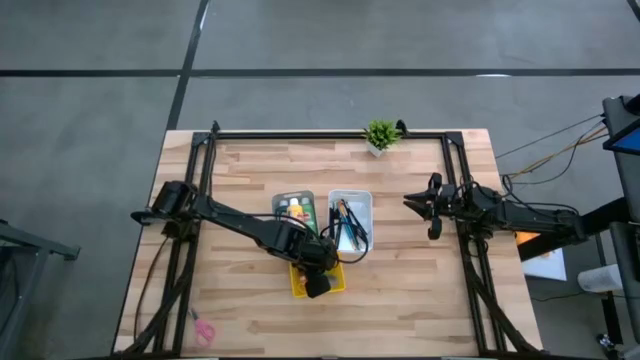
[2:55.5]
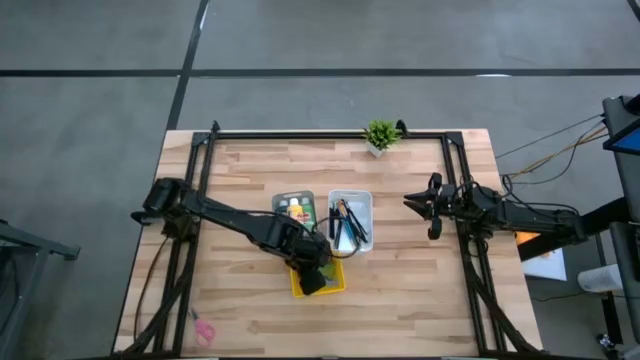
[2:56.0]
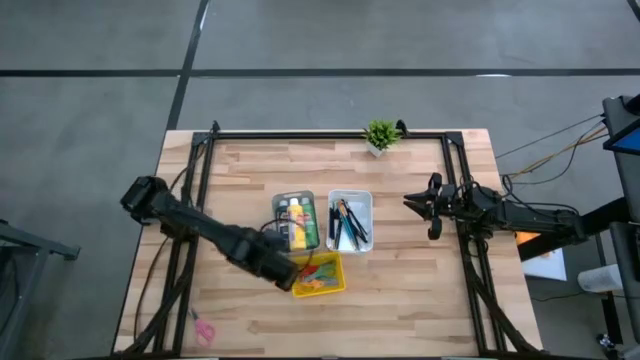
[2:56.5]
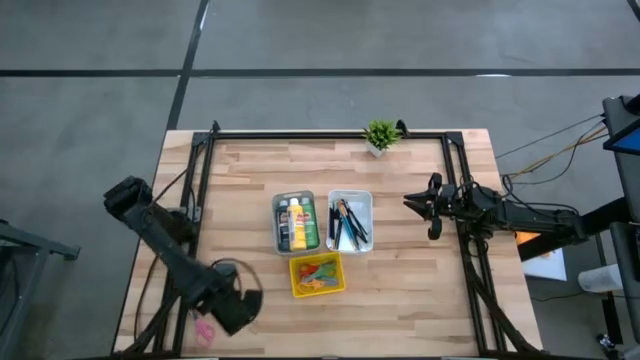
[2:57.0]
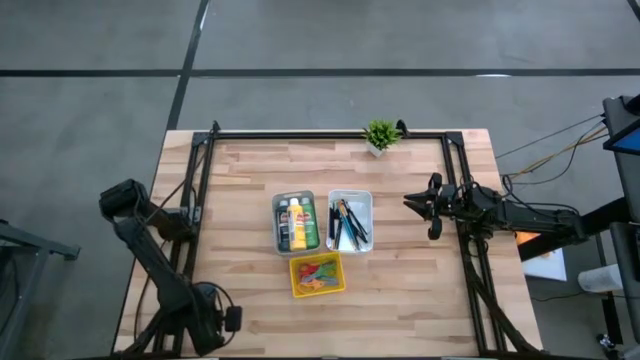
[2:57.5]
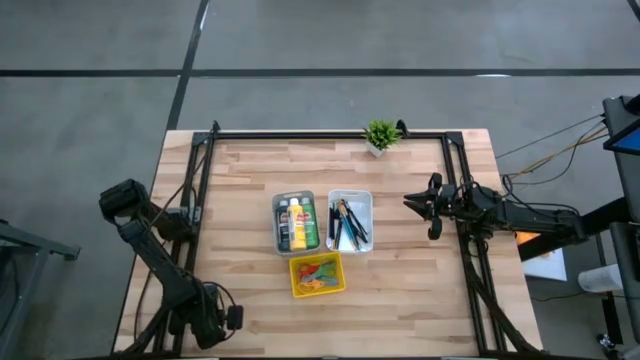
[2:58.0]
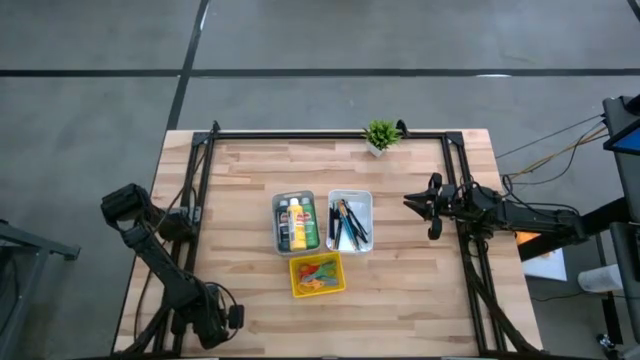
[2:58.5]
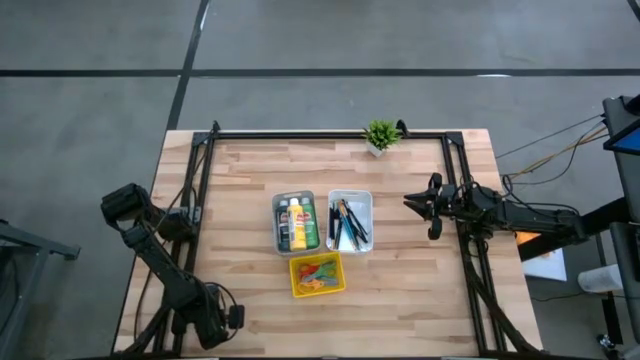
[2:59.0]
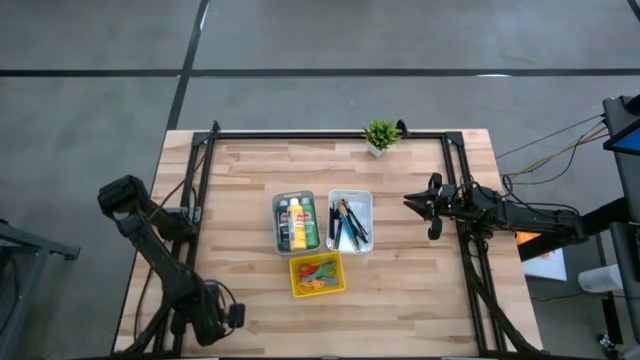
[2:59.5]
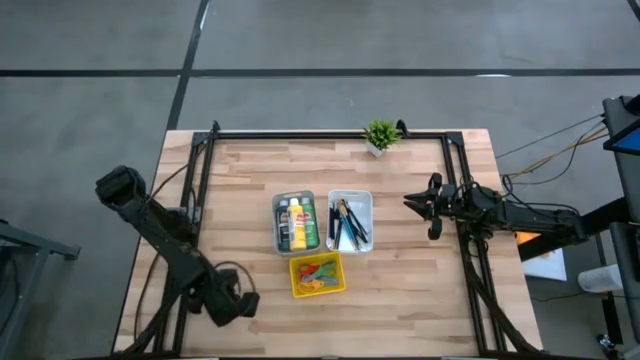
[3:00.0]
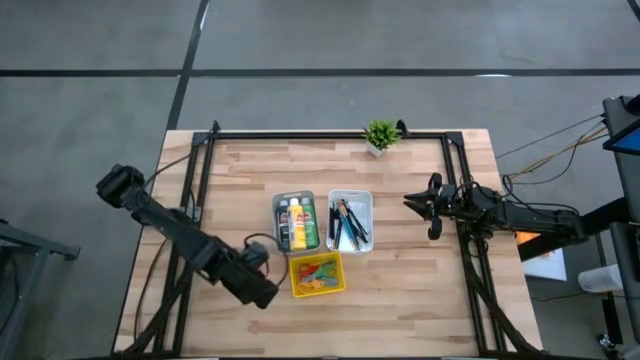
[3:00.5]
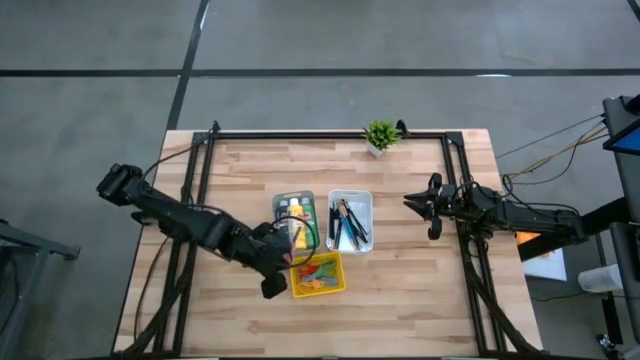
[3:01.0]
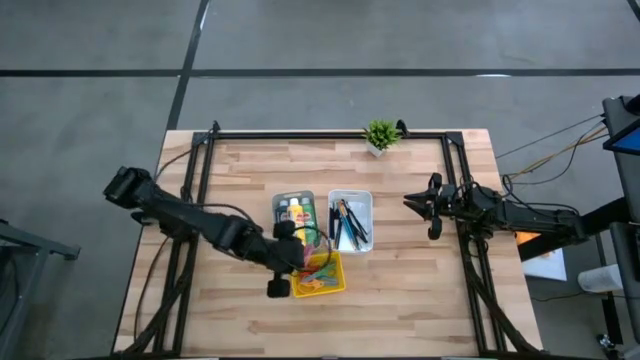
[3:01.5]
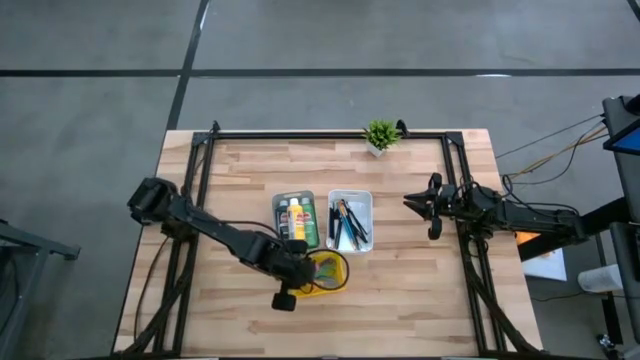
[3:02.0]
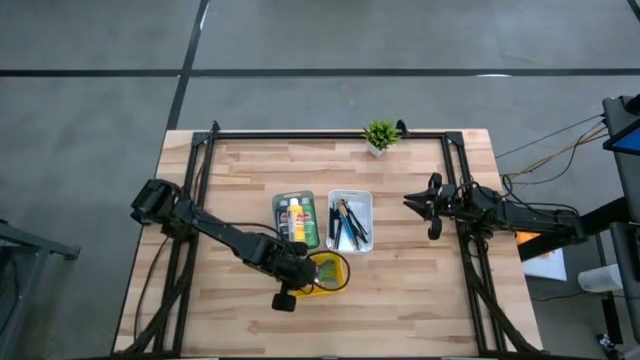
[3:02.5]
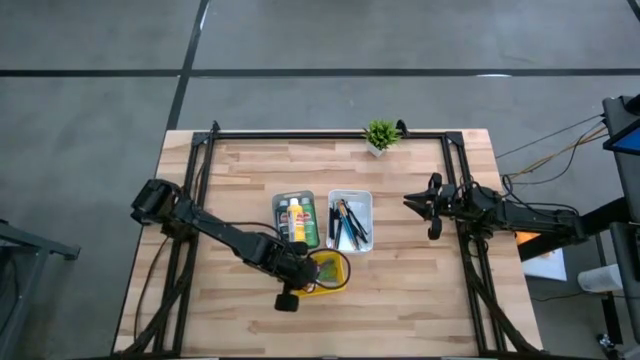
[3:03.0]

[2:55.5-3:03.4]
Task: Pick & Place Paint Supplies
Put the pink scissors into the yellow bin

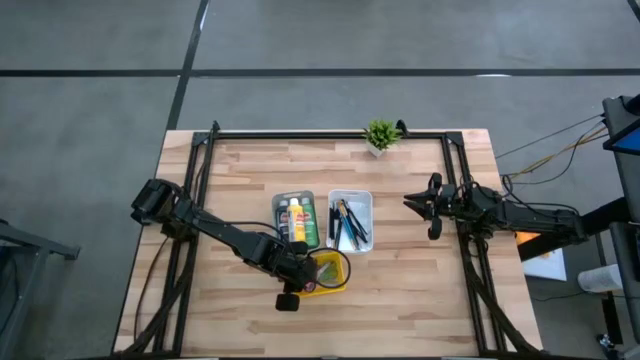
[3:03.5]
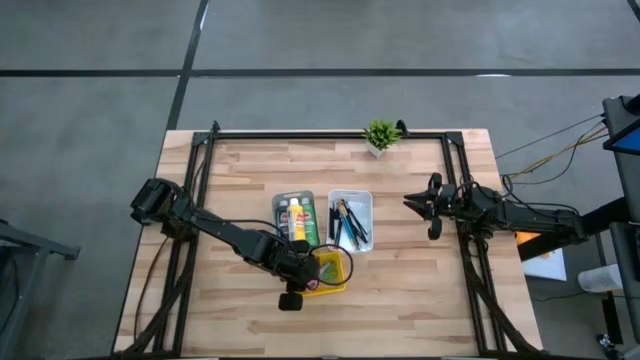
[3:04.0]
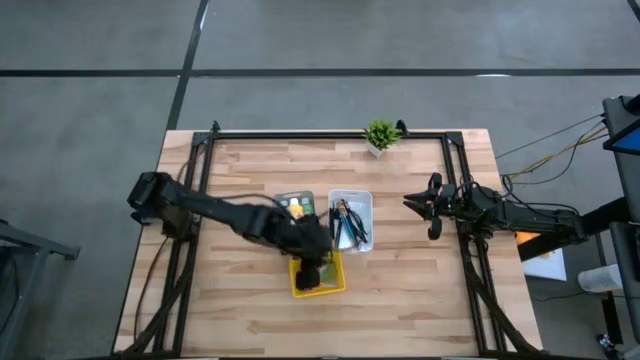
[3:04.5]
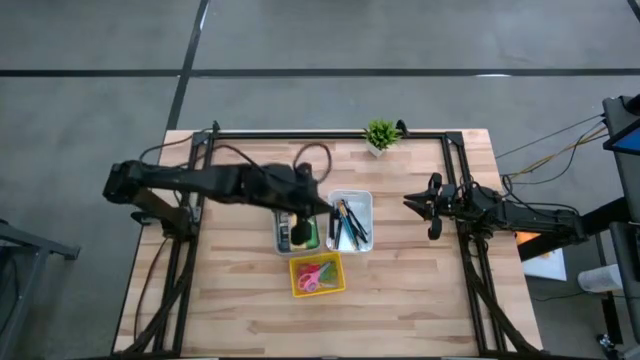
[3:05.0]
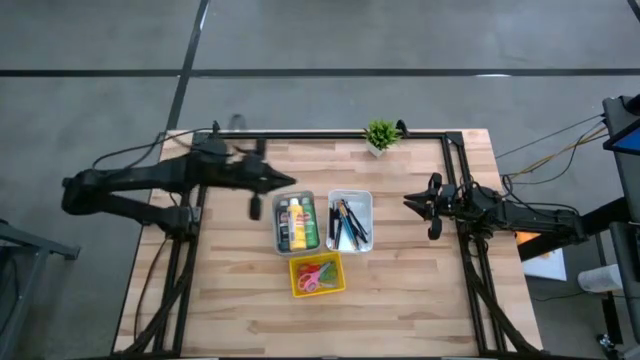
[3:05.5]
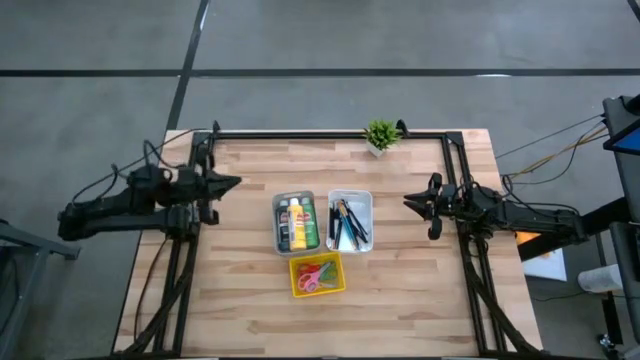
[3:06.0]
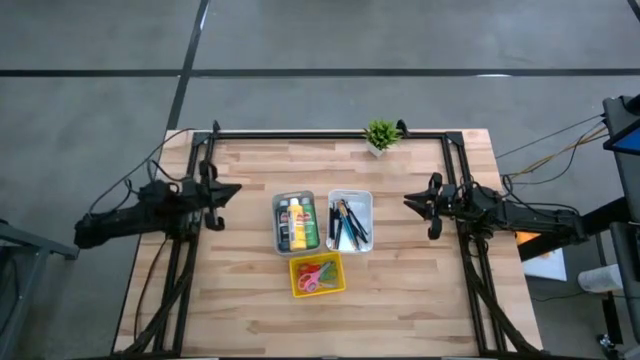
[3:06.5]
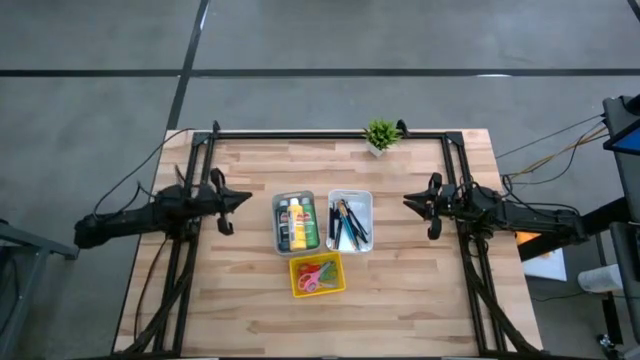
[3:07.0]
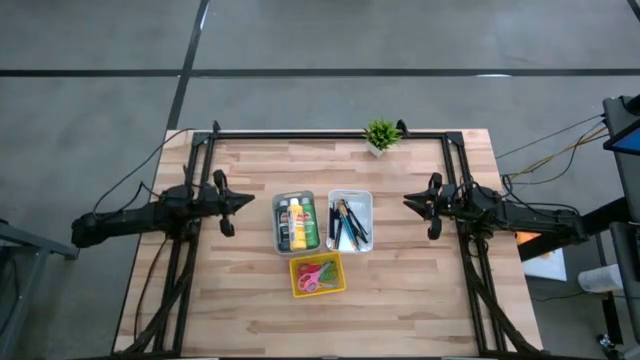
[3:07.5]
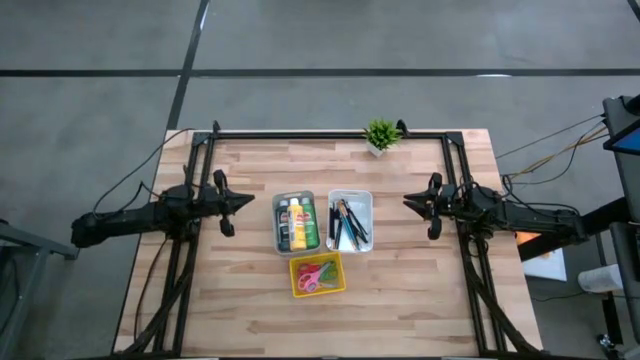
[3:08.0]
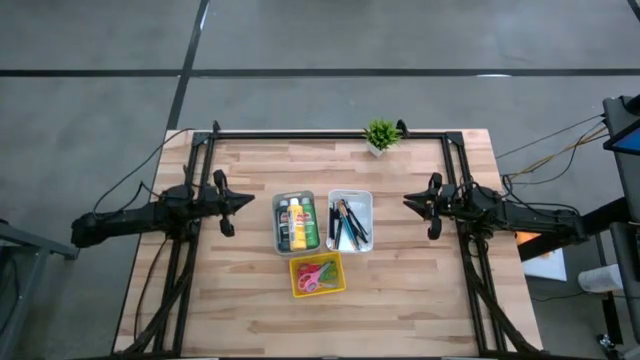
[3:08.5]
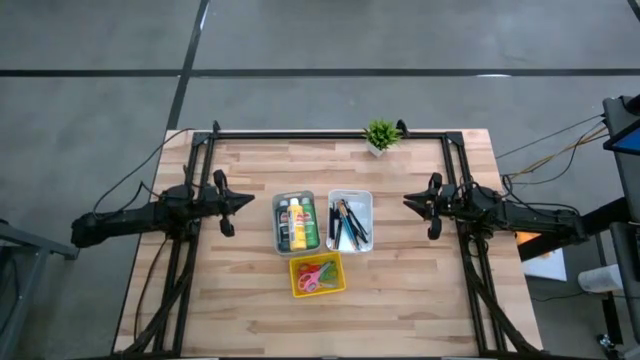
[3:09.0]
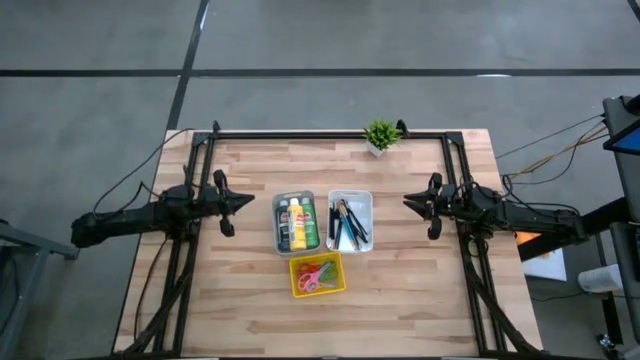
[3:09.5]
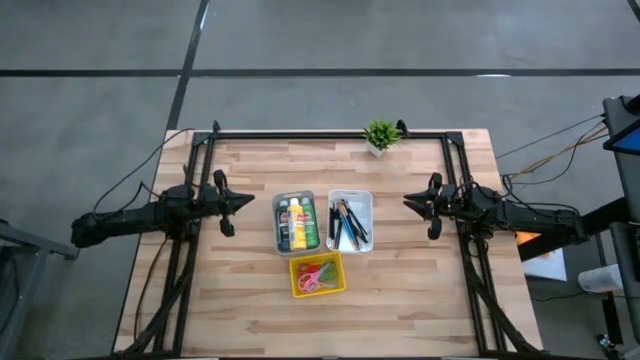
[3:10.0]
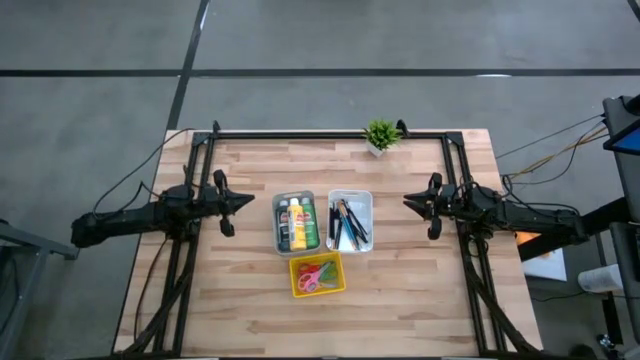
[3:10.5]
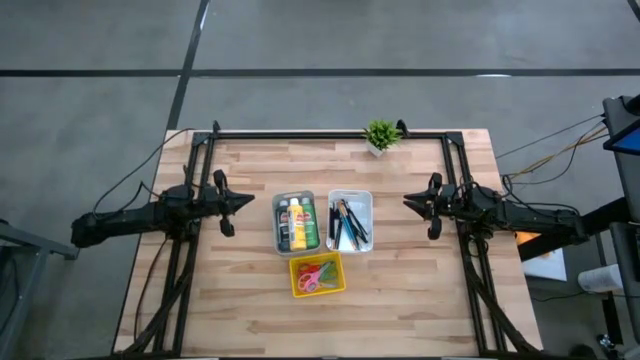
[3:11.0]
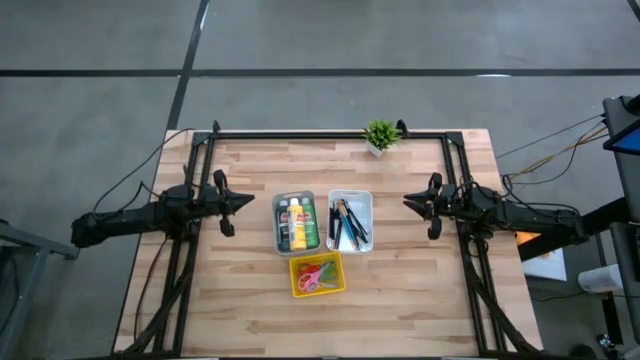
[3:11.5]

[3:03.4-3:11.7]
Return to Home Position

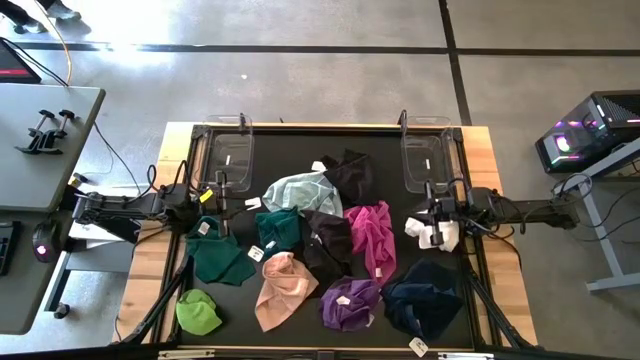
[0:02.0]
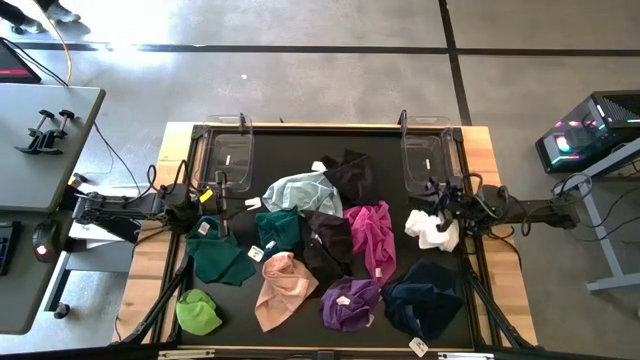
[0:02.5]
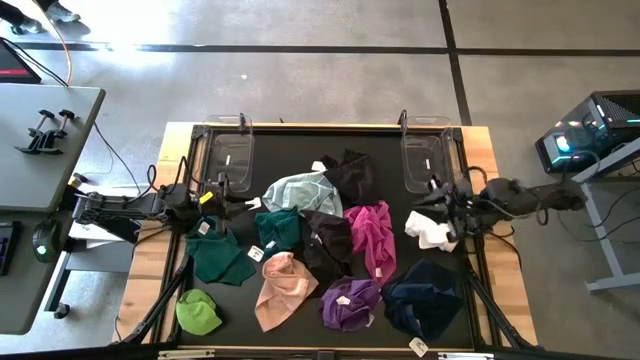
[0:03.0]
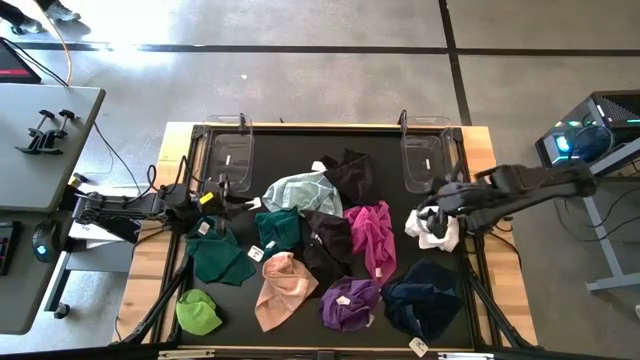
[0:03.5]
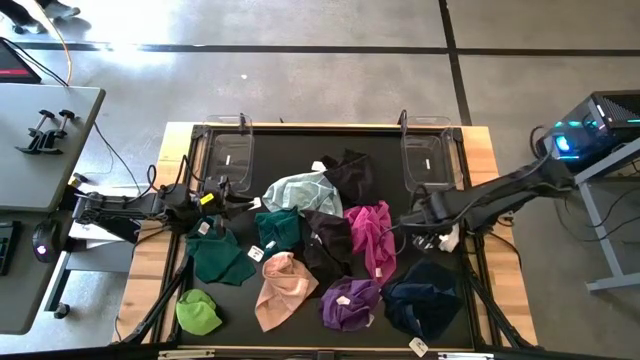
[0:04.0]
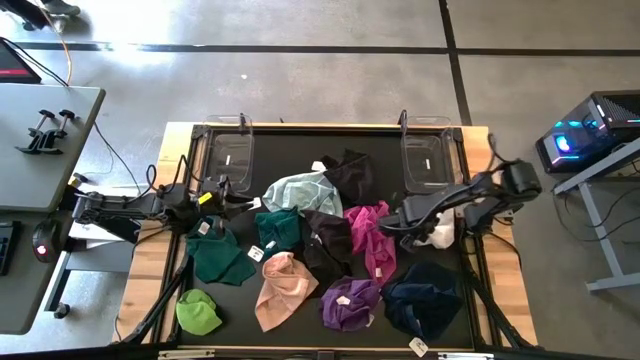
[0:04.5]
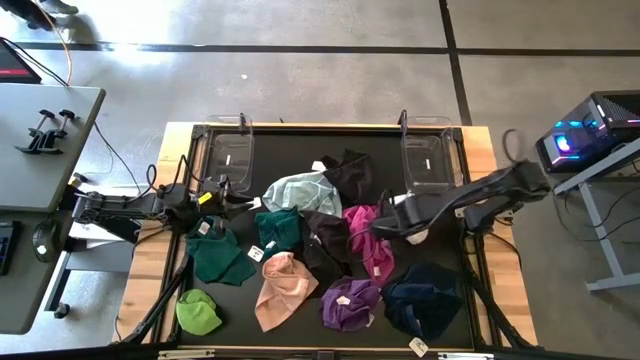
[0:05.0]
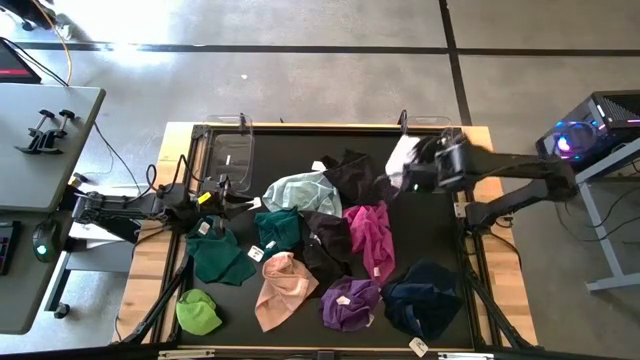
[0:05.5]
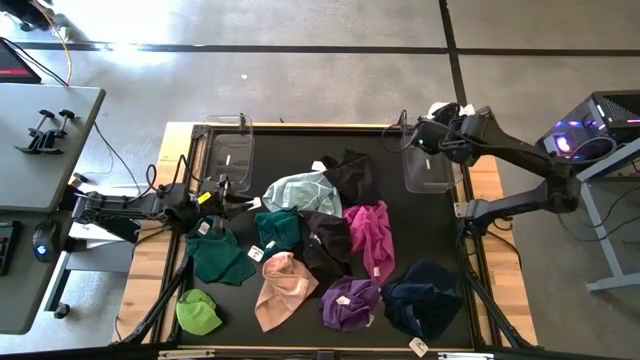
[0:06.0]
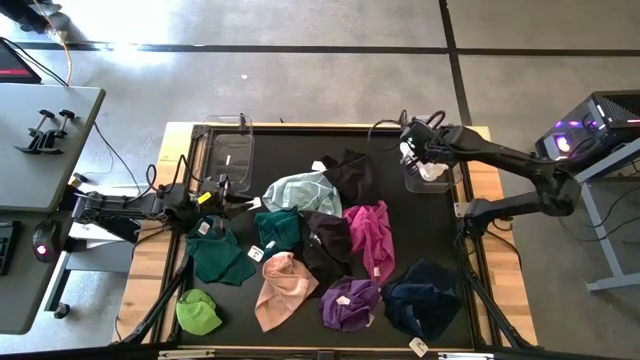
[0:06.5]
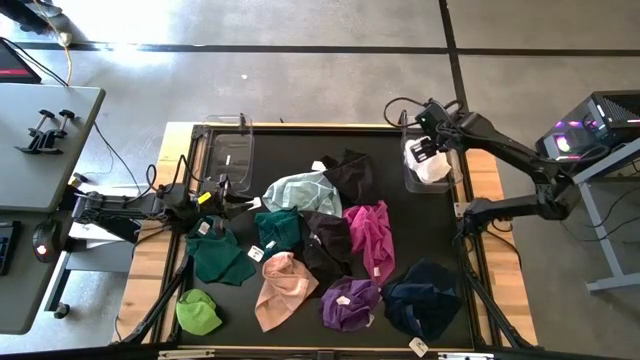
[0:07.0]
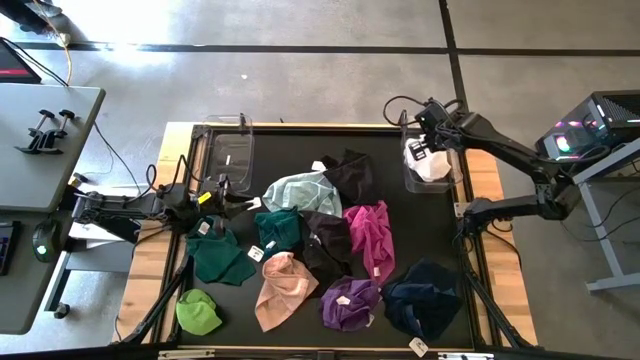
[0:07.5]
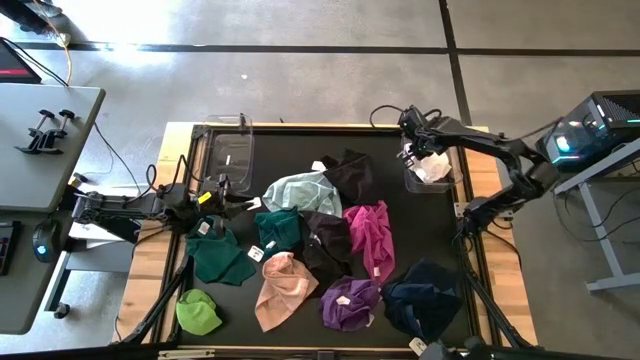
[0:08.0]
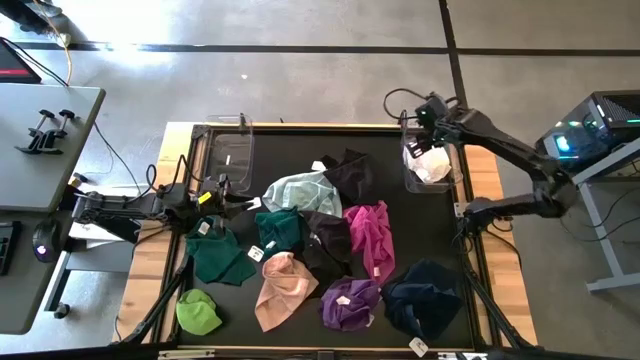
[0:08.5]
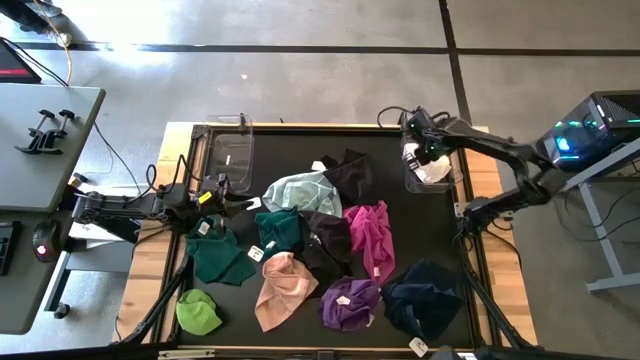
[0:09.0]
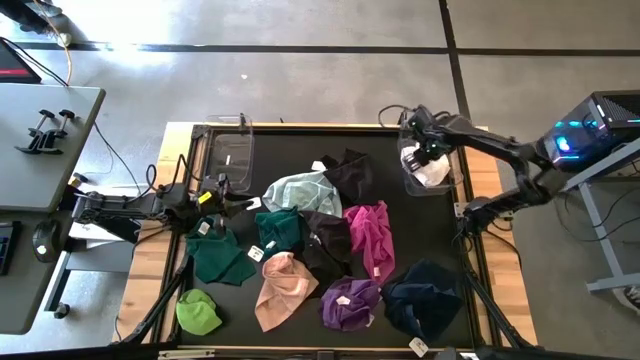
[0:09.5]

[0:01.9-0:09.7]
Task: Sort towels by color in basket
Put the white microfiber cloth into the right transparent bin
